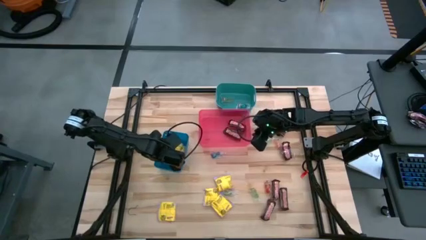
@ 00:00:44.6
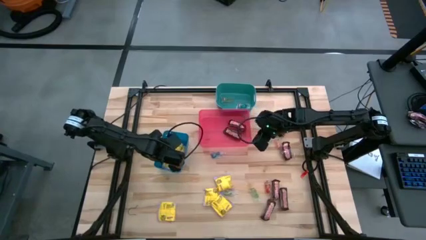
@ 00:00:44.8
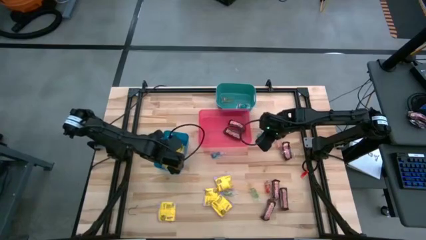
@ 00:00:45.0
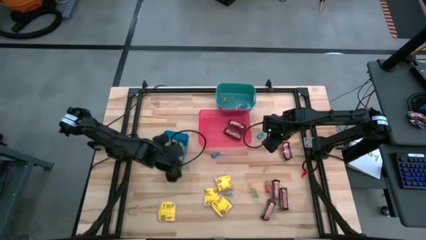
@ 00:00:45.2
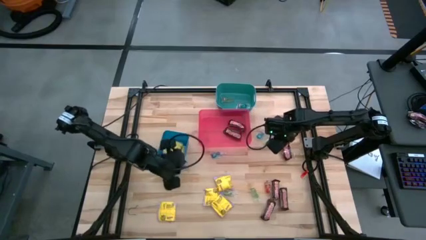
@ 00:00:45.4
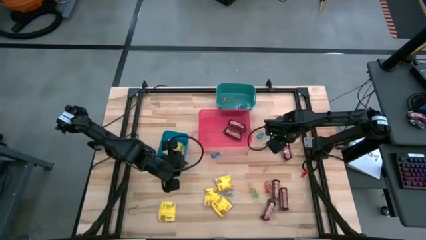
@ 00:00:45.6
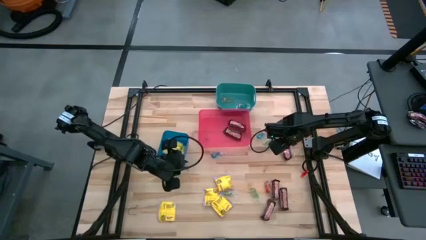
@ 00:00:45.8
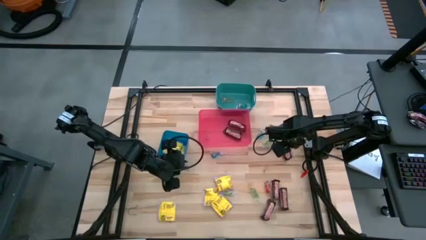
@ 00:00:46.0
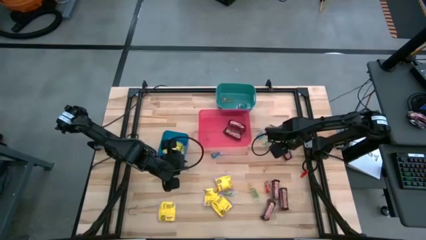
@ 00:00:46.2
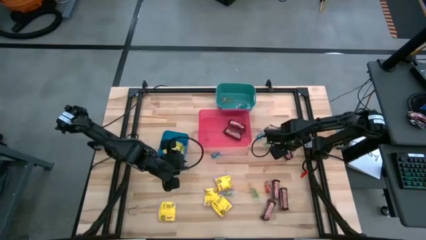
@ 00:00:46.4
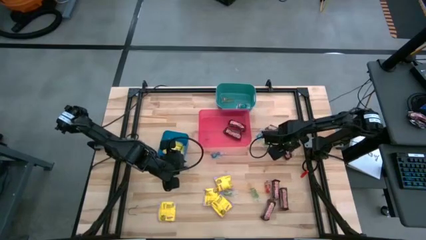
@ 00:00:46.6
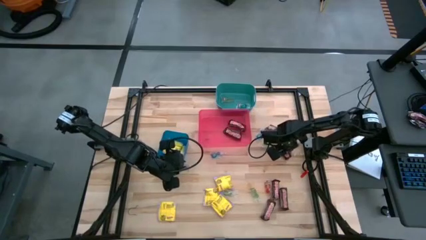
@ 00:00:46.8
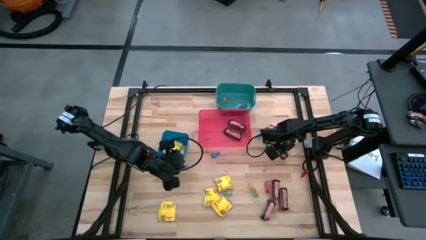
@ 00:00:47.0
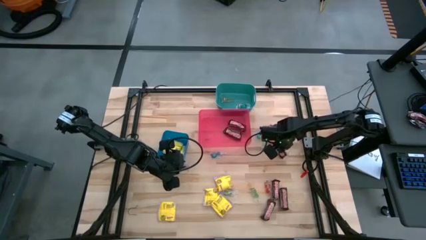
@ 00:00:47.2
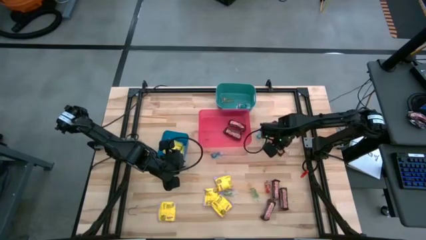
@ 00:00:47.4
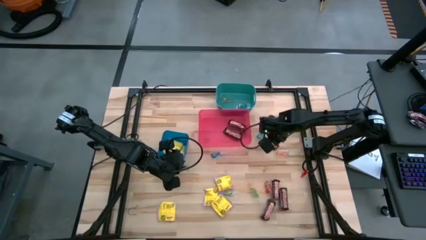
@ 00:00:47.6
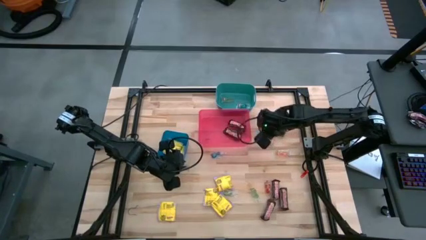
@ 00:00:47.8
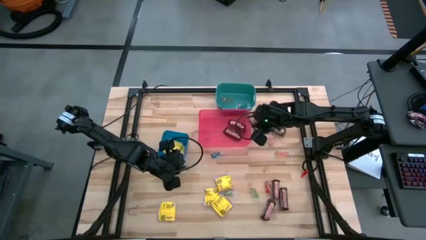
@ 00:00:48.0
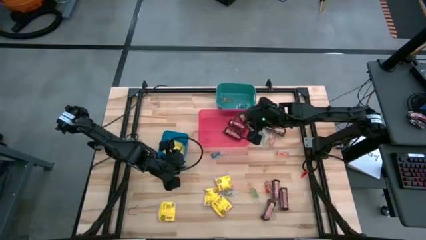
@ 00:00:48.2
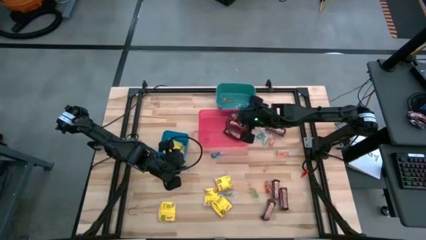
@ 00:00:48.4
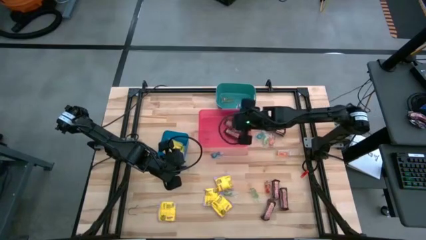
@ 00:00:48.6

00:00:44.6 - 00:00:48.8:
Task: Sort candy
Put the brown chocolate bar into the red bin

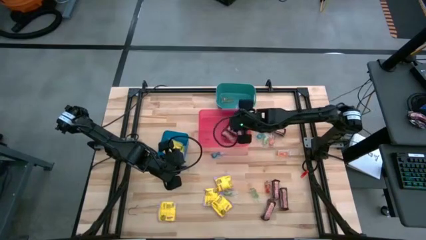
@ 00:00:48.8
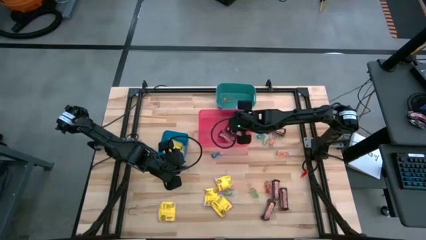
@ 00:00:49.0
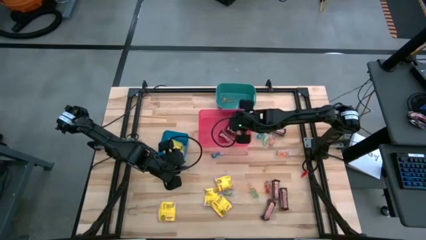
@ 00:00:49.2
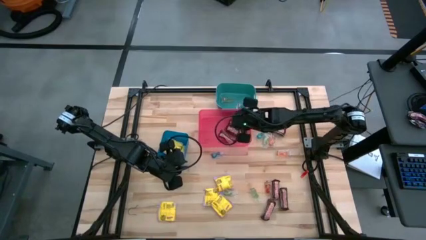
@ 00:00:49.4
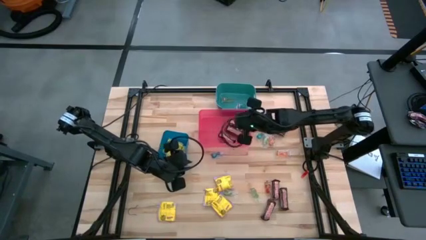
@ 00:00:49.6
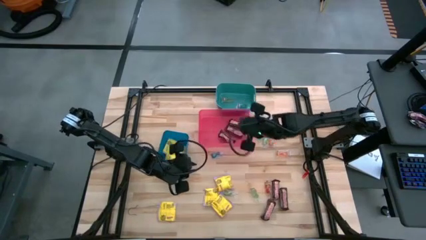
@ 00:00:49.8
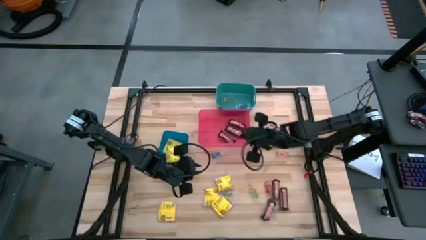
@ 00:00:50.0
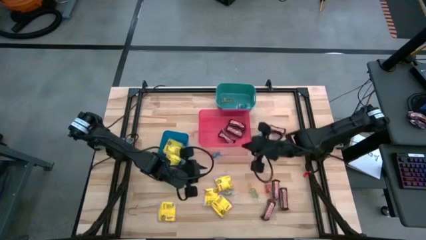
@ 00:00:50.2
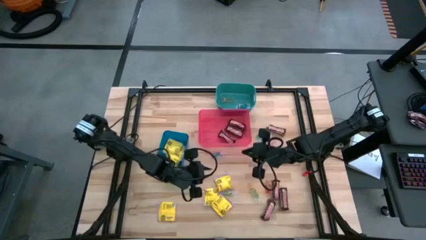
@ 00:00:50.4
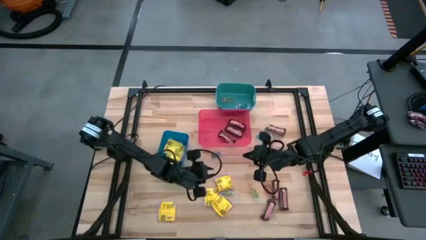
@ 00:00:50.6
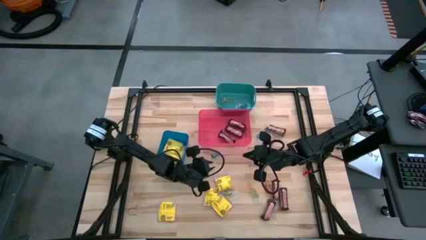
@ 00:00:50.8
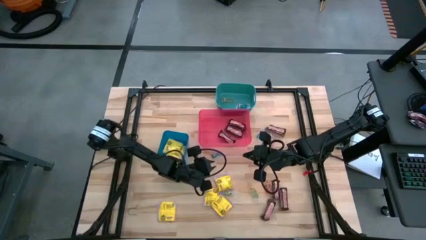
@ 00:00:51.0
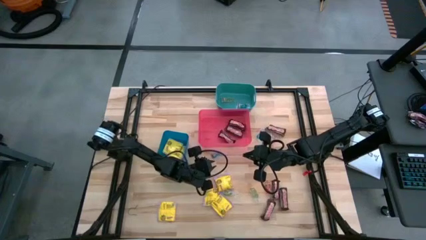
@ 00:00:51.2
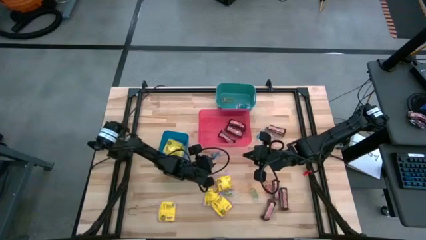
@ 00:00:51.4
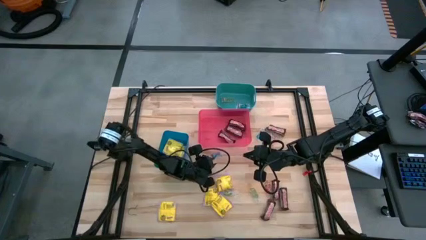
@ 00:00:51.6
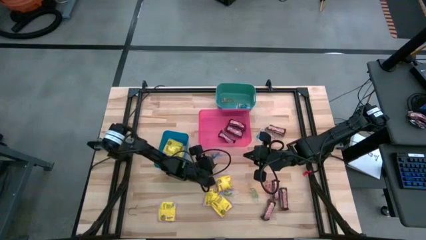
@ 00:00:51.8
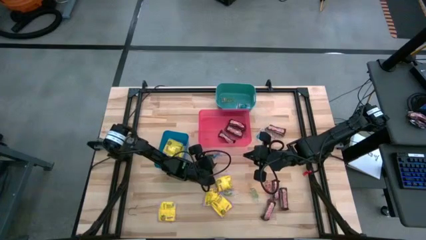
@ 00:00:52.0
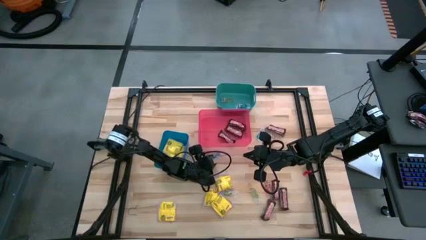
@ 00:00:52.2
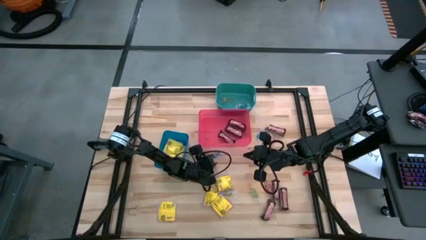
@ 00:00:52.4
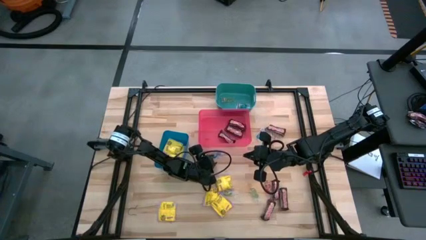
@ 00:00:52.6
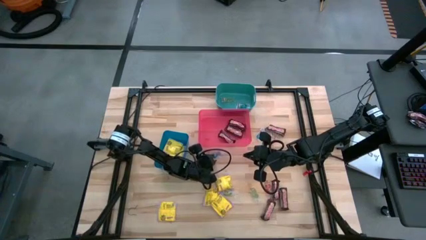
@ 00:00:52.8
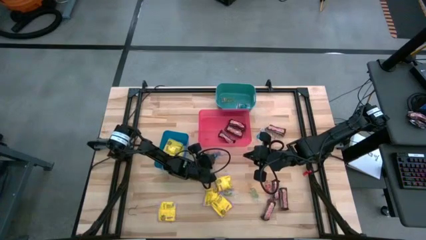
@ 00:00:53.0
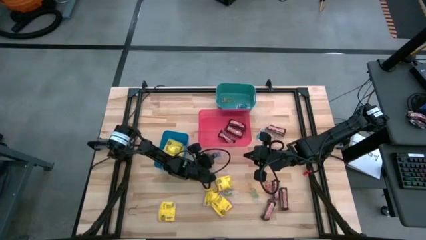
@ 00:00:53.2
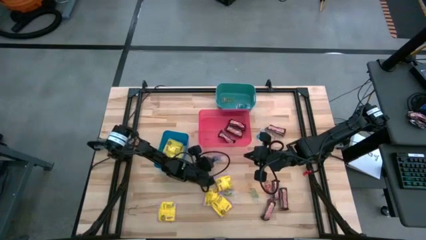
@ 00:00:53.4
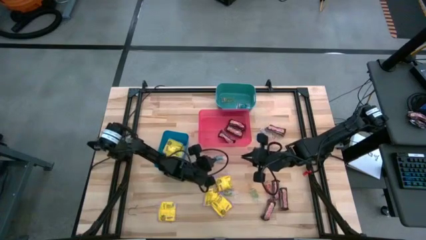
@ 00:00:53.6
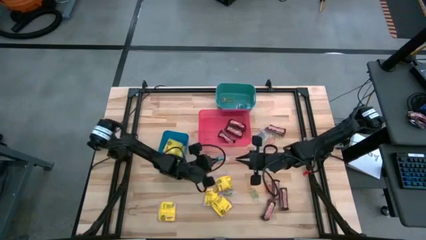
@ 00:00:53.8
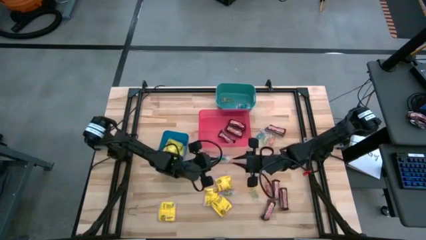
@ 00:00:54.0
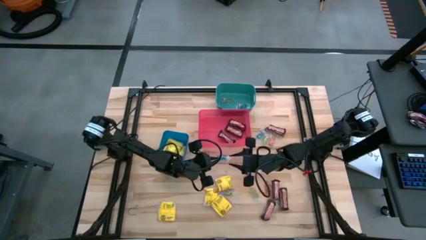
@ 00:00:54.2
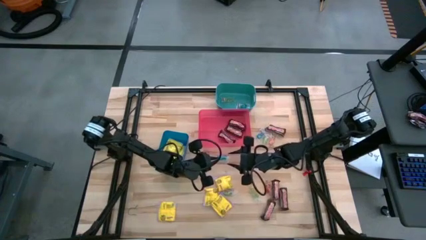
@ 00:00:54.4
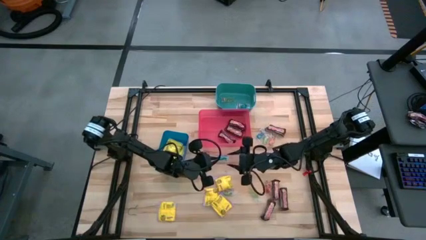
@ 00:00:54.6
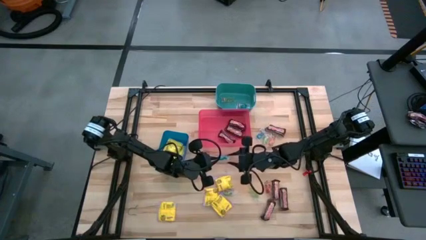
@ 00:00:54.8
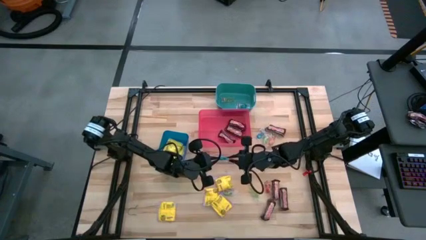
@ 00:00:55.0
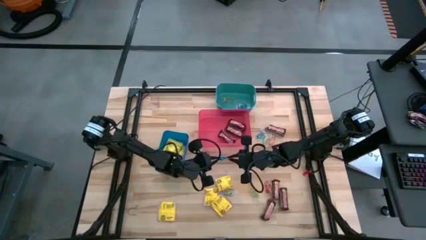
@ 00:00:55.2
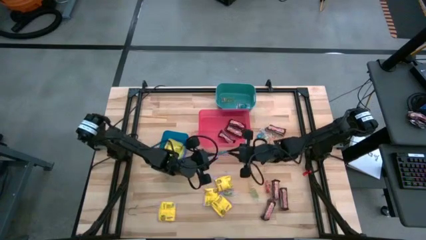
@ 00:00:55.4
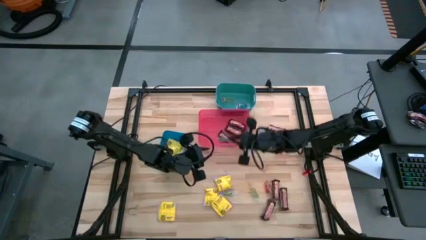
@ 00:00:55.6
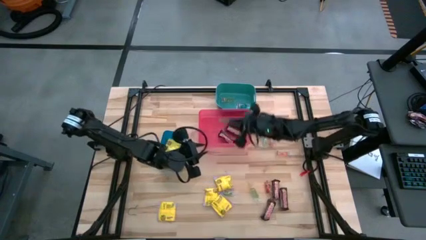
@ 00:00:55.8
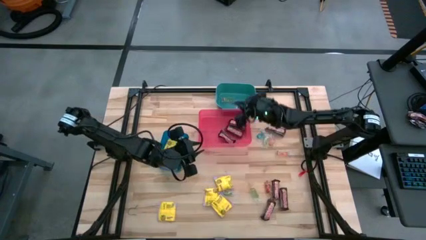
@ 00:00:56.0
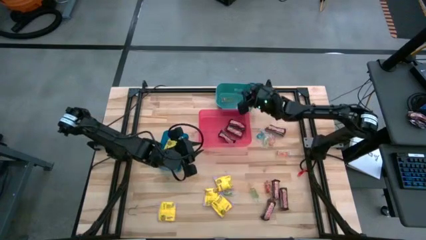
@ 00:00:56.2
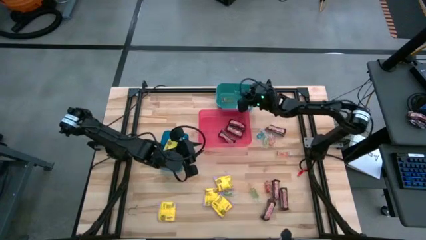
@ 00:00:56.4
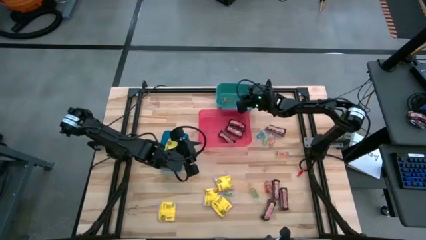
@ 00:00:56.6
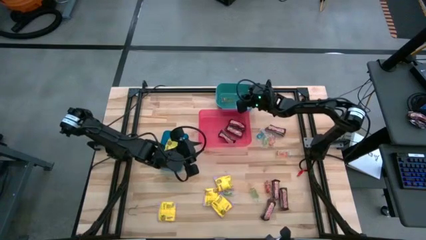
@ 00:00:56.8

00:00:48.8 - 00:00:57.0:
Put the blue gummy into the green bin

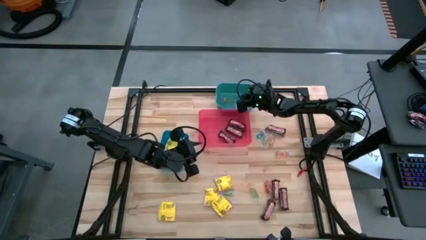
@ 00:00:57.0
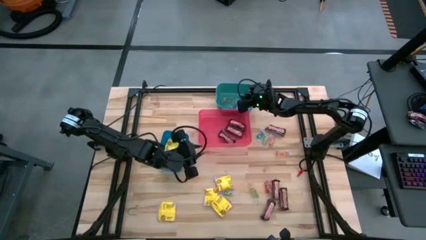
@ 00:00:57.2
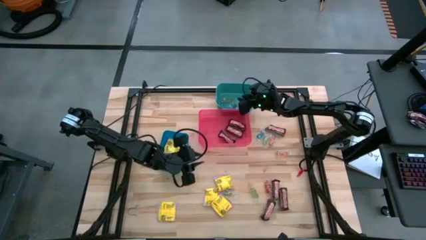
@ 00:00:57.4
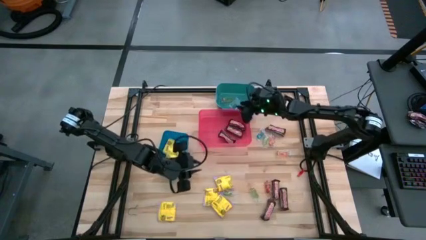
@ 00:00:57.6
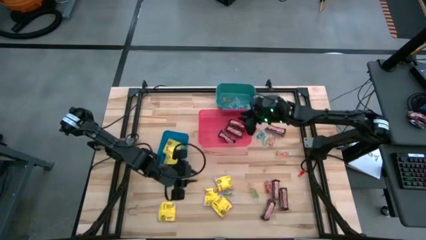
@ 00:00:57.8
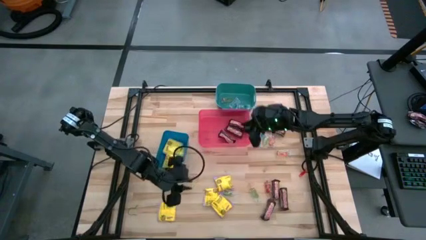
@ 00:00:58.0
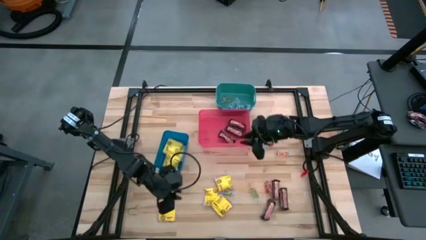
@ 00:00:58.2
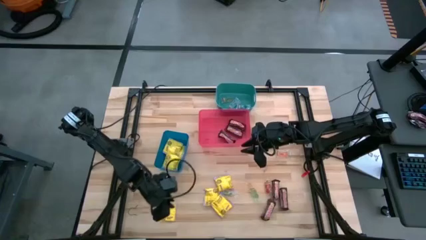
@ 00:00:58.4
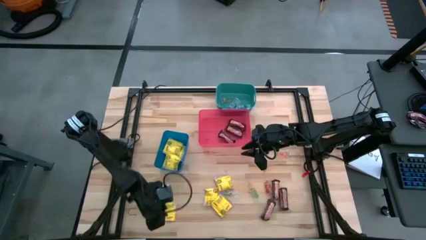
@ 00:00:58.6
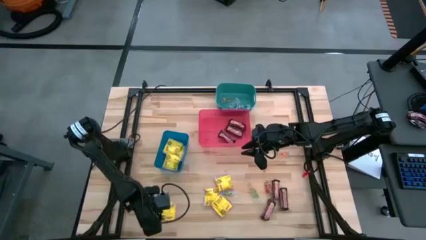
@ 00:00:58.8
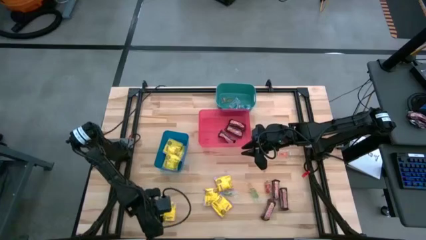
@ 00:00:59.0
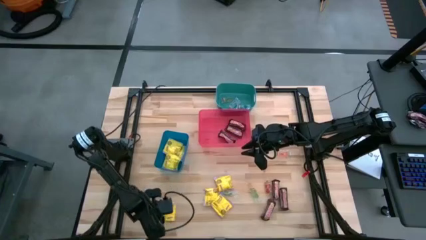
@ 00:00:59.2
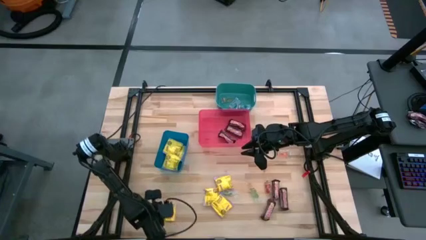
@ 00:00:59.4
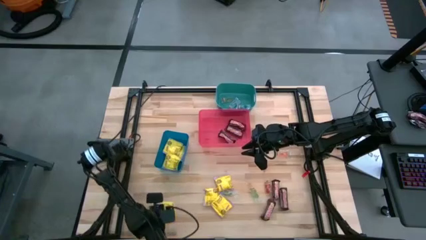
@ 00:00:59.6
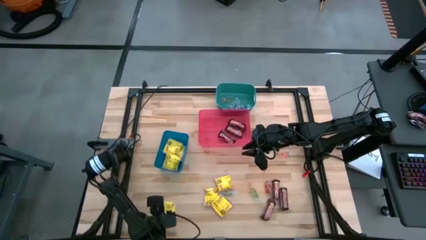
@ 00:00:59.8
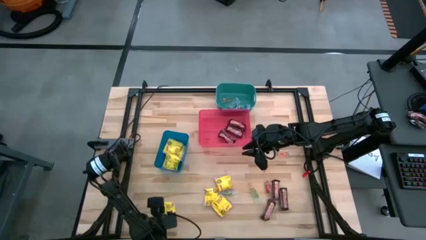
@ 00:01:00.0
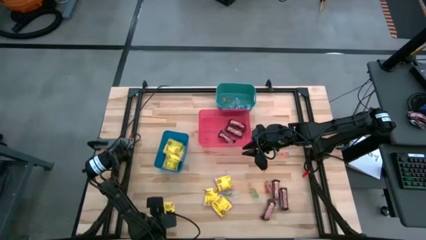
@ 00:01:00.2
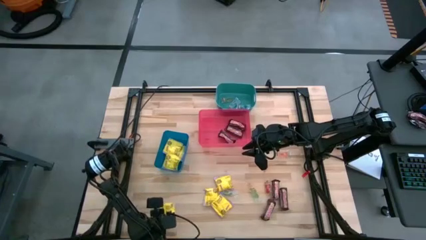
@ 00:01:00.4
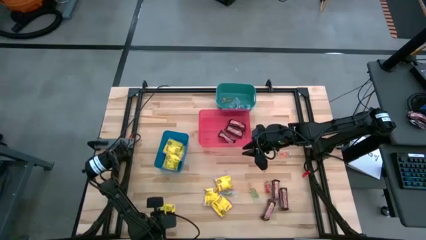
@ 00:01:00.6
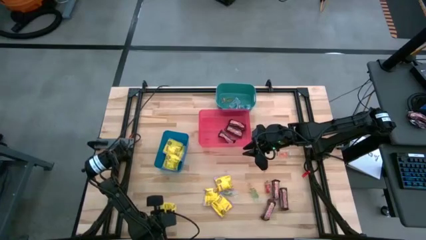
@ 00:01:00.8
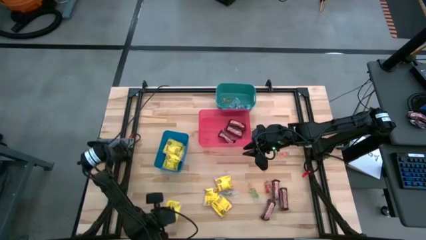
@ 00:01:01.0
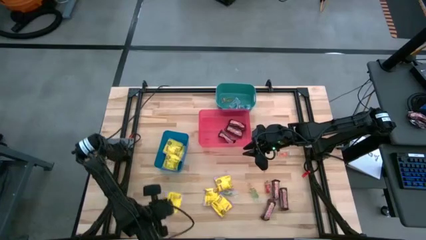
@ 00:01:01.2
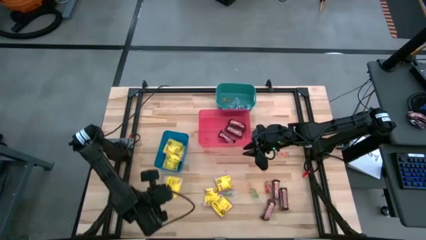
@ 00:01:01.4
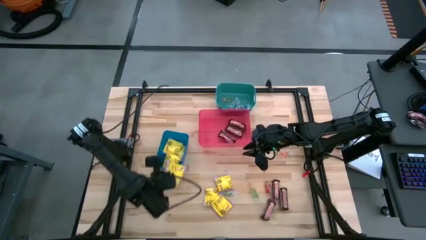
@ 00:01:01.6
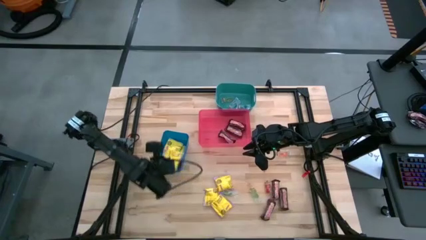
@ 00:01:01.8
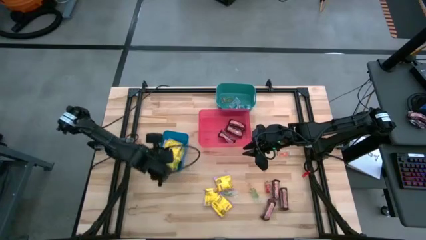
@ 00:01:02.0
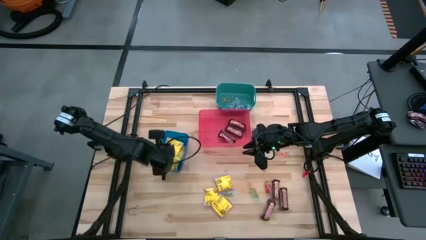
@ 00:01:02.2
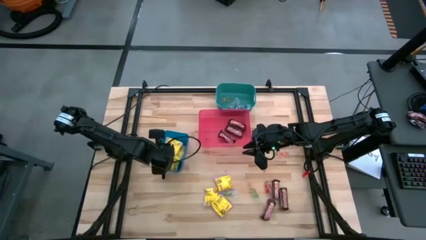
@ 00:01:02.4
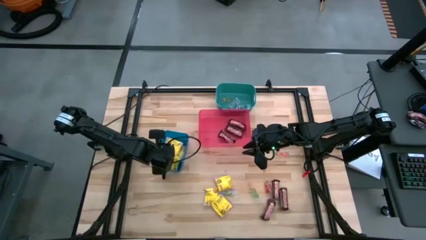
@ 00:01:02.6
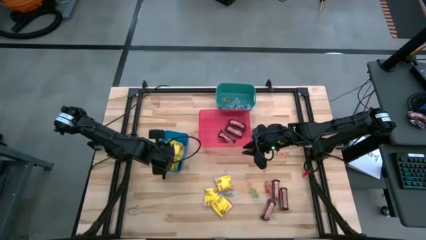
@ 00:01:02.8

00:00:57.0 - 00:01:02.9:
Put the yellow candy into the blue bin
